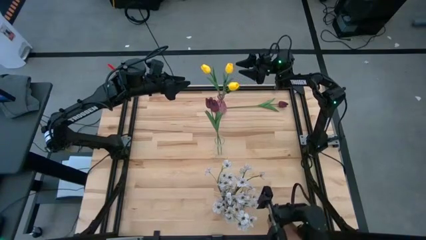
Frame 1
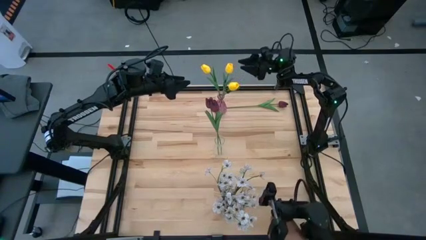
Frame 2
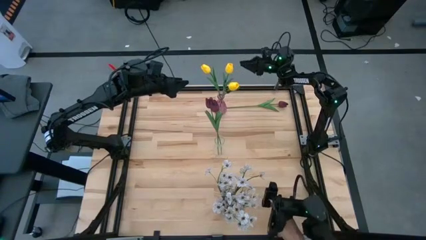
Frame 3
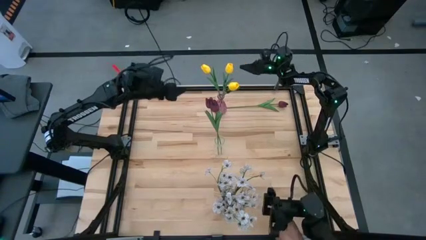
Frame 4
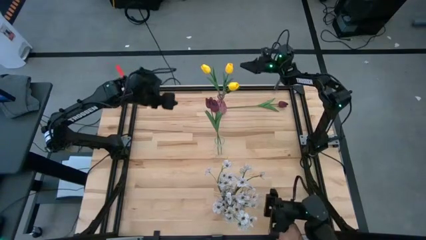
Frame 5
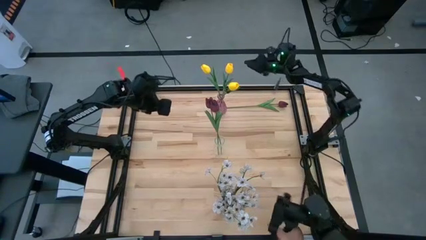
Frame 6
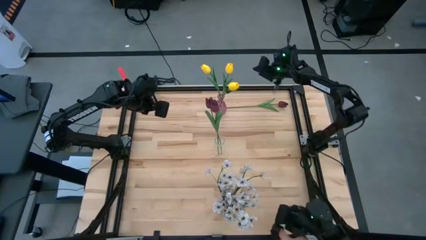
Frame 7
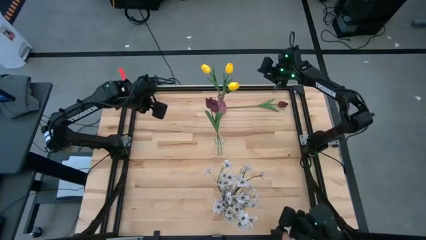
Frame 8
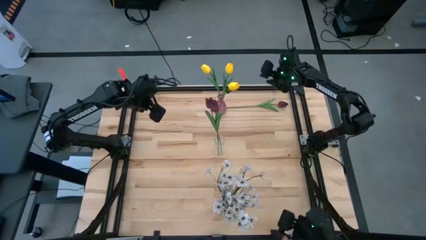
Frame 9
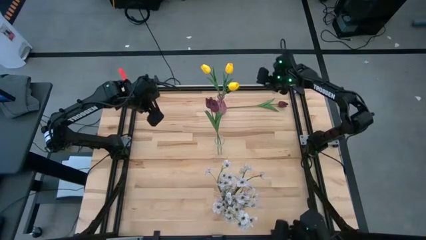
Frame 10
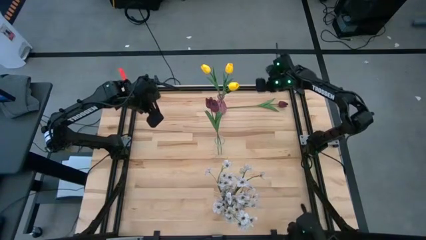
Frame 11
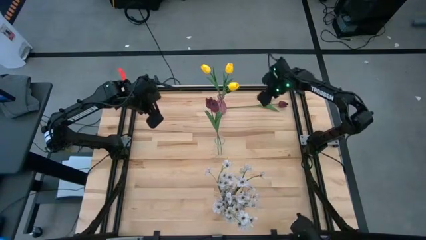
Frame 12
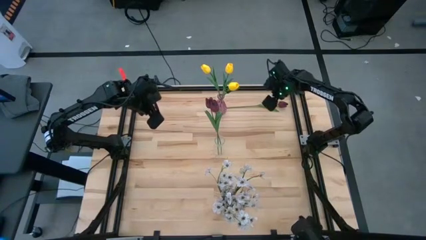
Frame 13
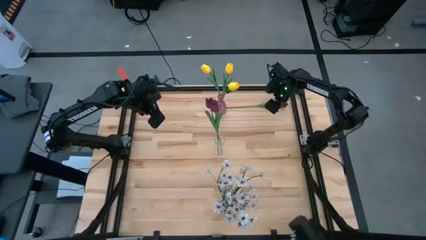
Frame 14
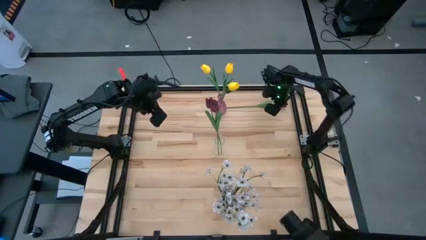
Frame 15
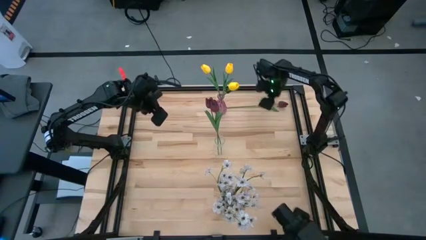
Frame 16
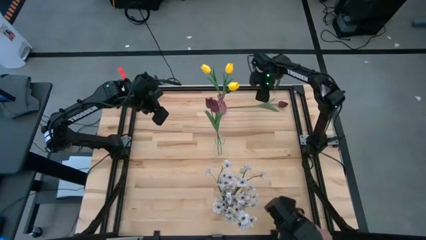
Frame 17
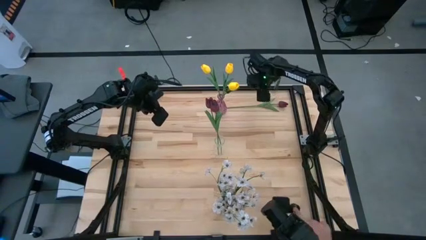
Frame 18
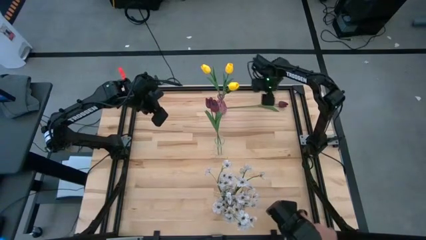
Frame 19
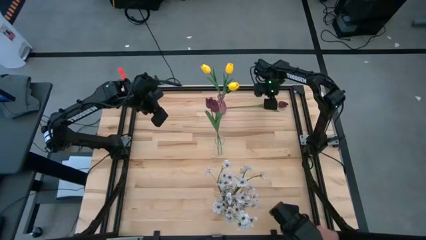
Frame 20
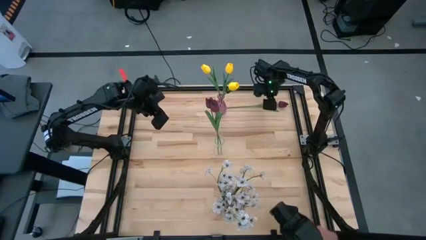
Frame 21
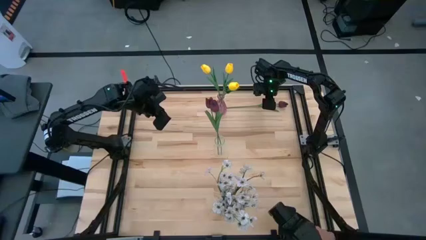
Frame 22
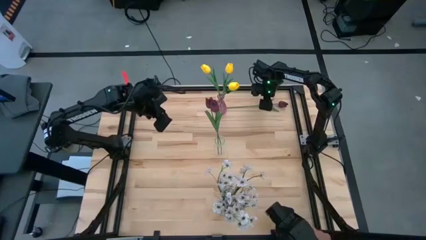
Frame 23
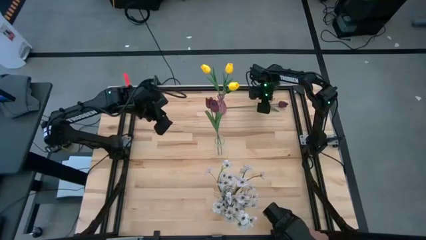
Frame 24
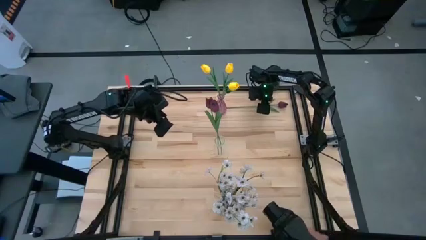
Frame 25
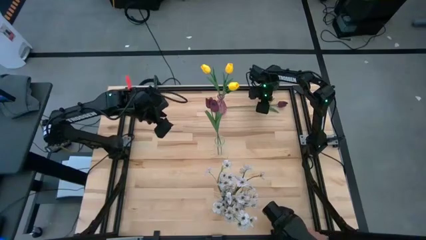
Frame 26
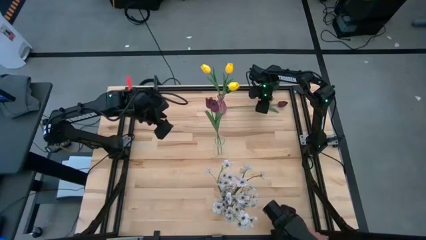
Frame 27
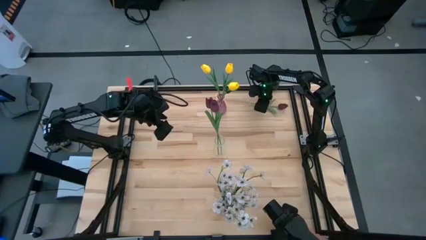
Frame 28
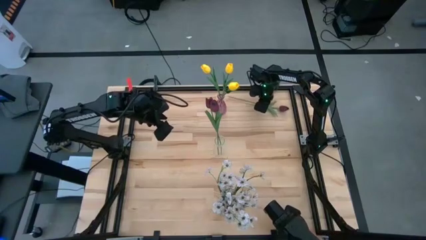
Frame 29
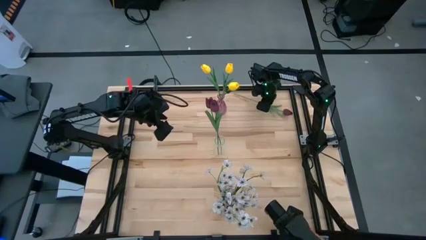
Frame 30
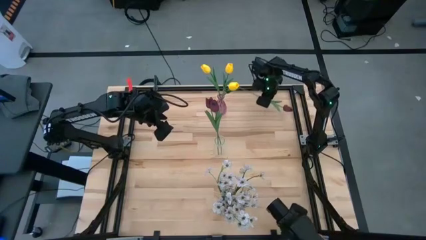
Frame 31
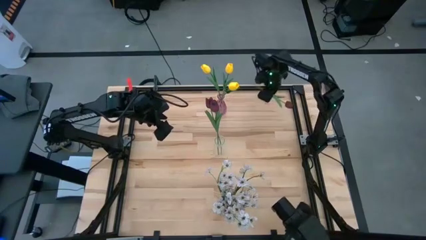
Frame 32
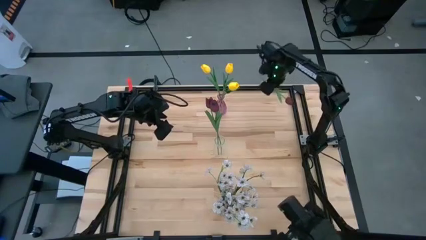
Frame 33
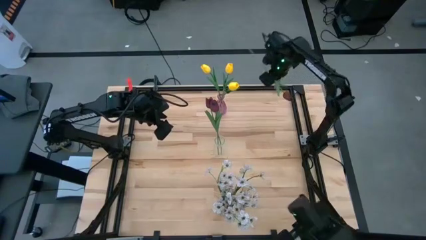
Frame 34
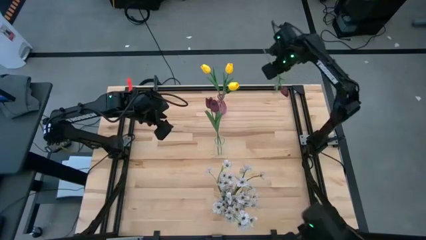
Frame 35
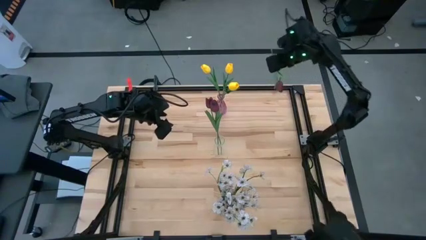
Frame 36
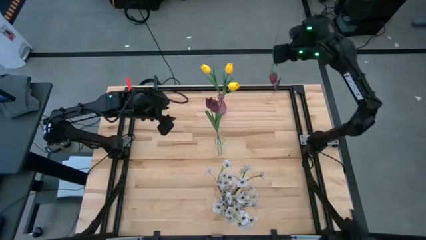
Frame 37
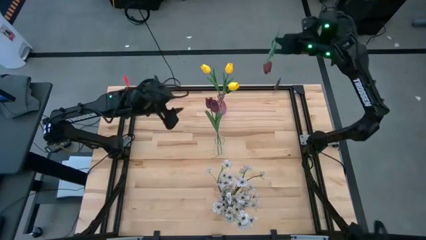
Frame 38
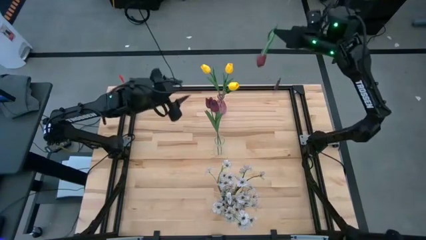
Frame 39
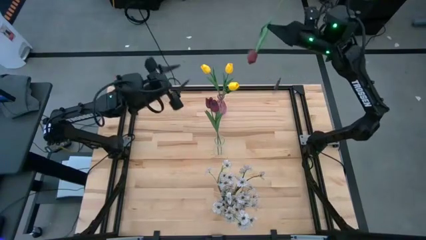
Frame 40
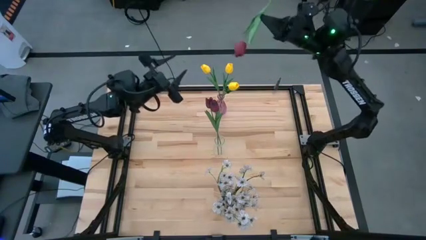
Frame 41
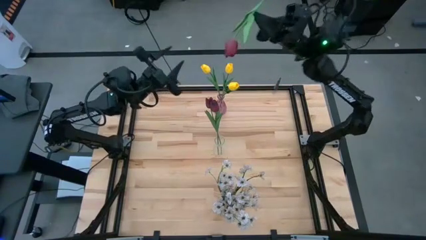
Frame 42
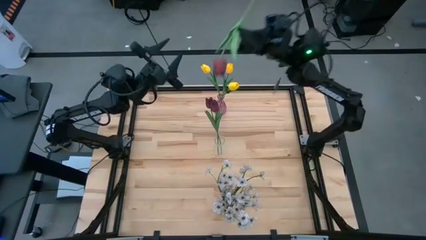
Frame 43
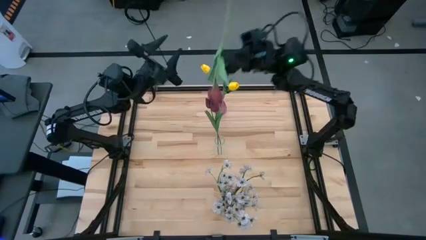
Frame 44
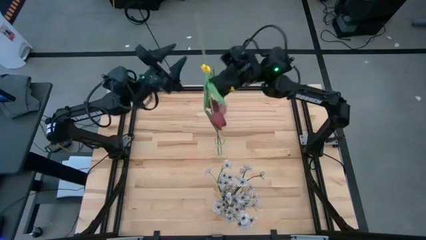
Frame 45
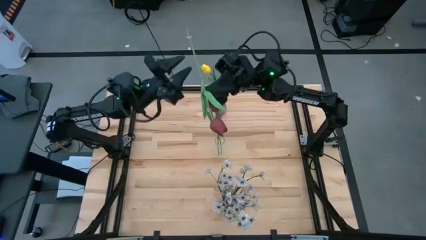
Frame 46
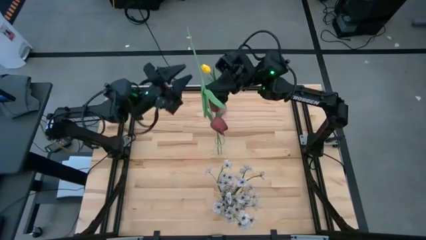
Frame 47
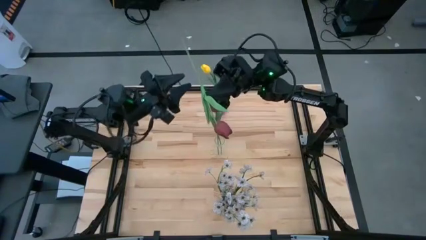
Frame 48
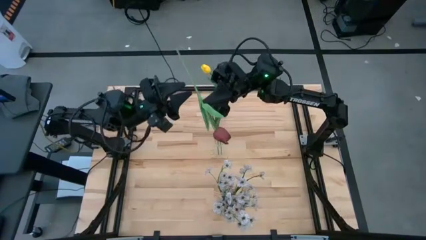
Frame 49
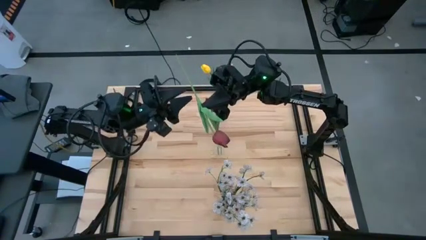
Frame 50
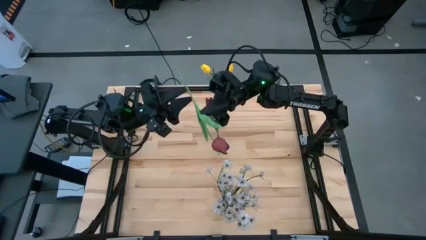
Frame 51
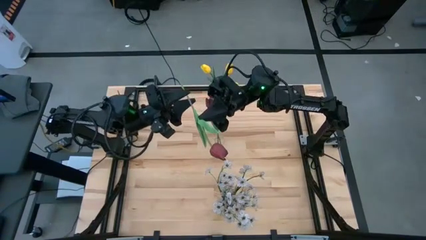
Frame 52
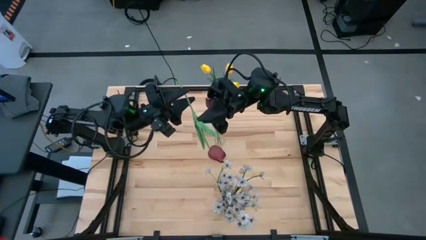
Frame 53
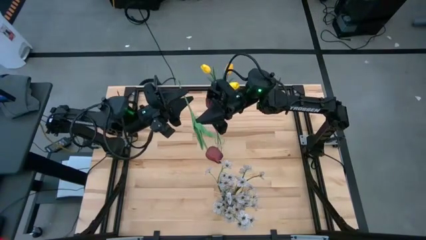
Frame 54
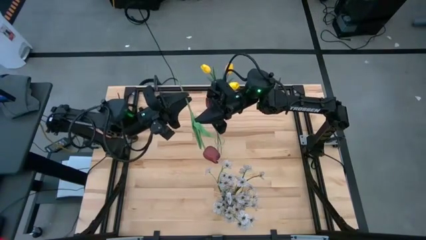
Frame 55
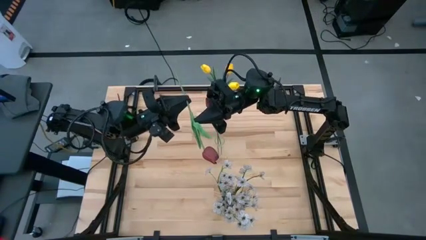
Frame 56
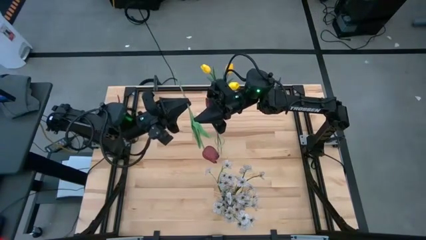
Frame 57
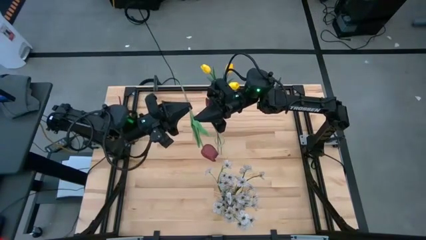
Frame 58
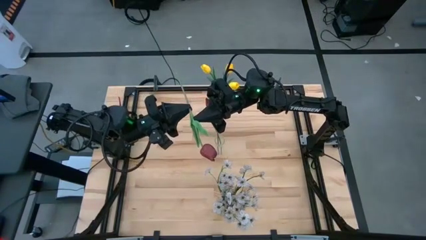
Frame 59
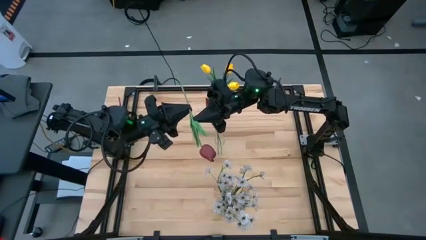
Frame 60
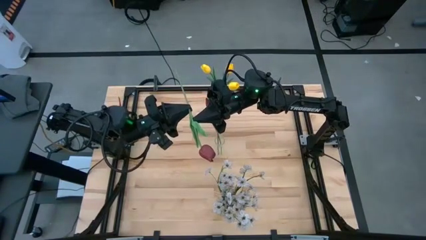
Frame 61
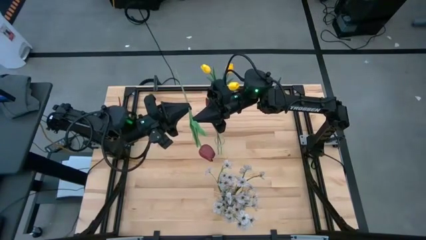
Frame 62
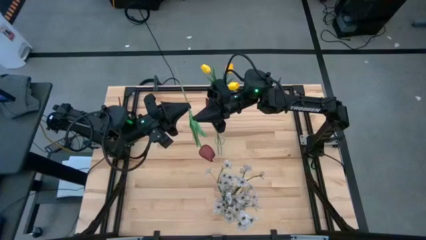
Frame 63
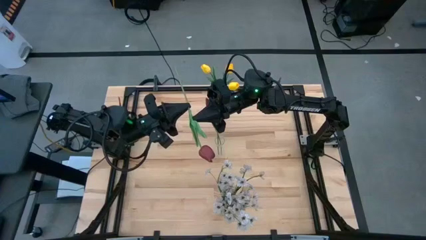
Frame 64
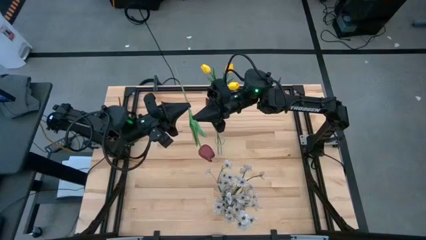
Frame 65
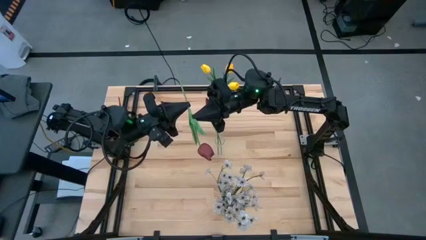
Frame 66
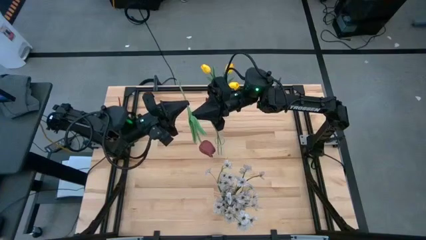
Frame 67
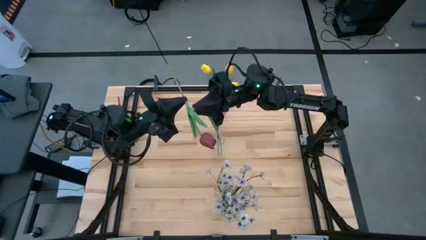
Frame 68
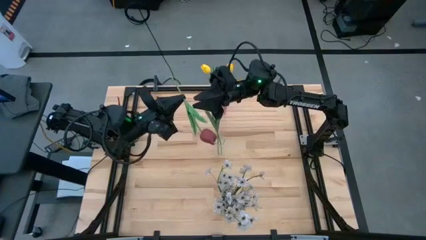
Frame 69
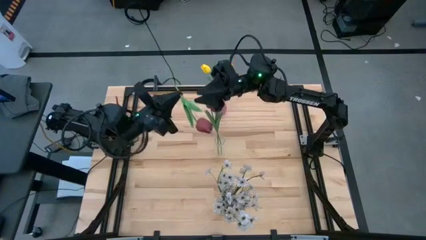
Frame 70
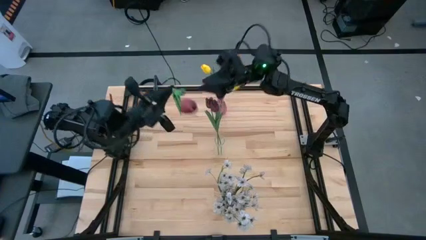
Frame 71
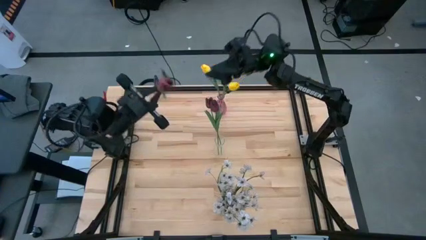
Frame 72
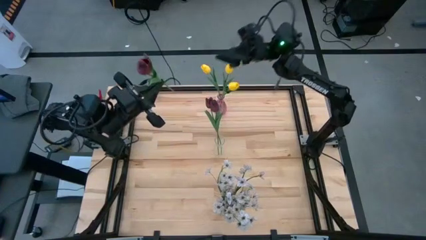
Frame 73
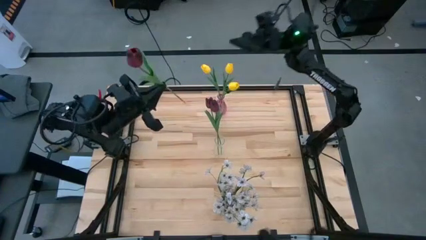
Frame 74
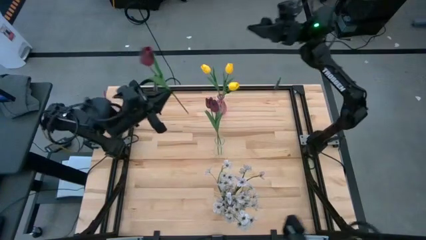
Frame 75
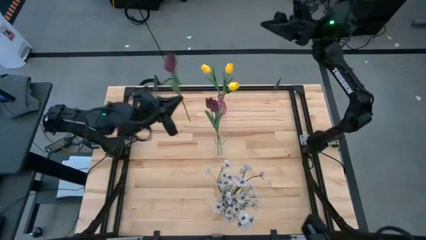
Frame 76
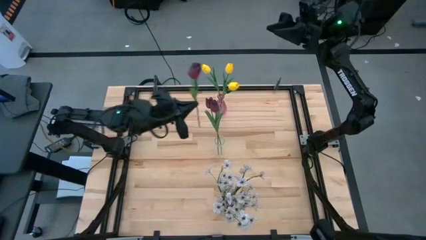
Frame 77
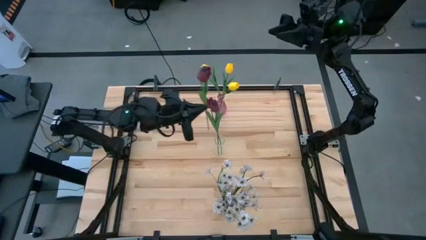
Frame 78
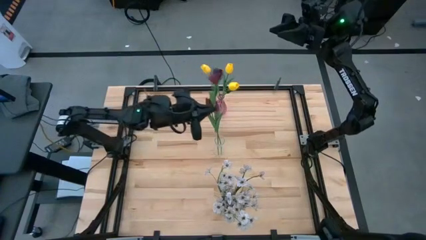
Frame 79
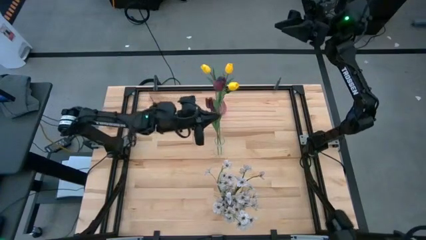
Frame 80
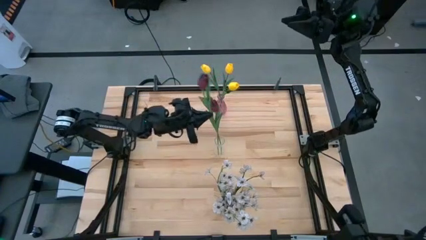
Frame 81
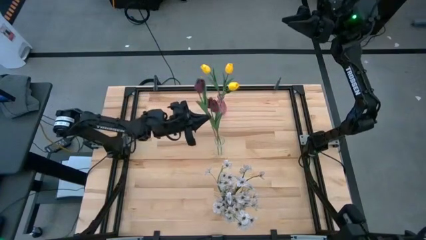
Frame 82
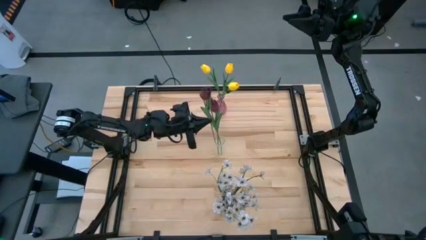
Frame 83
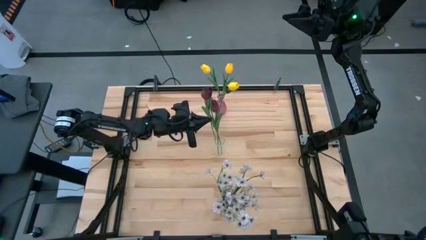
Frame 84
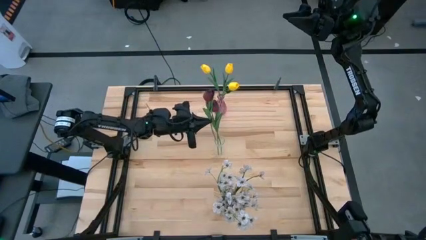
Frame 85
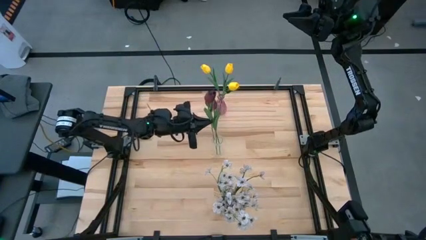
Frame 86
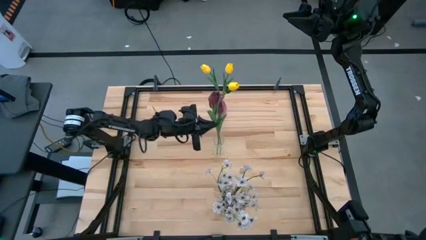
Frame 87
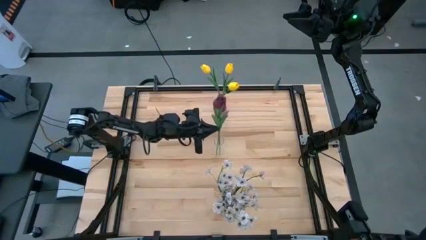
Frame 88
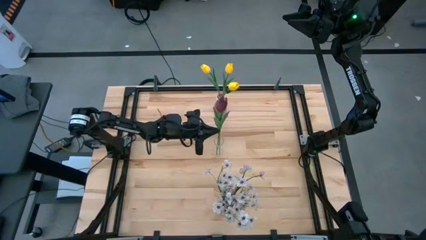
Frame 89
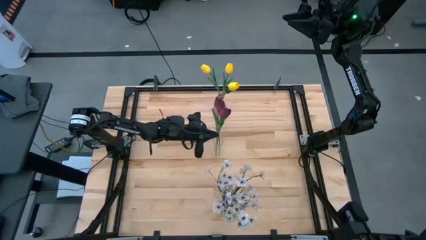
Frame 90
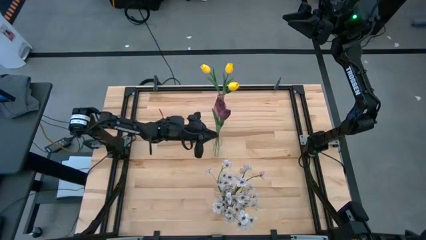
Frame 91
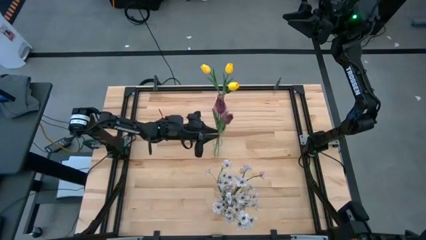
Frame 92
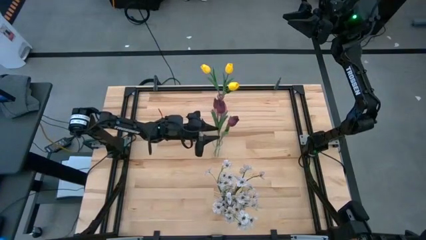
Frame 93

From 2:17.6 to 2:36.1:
Task: Sort flowers into vase by color
Put the red flower into the top transparent vase
